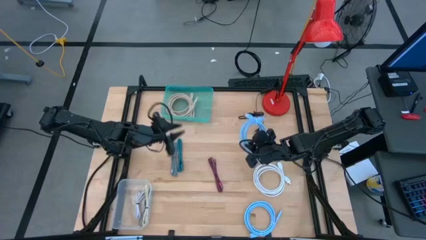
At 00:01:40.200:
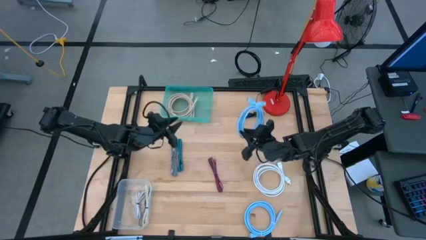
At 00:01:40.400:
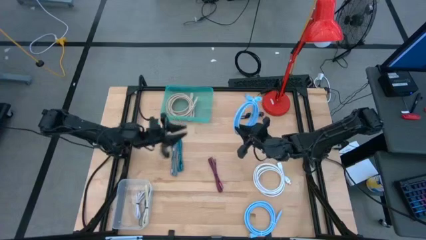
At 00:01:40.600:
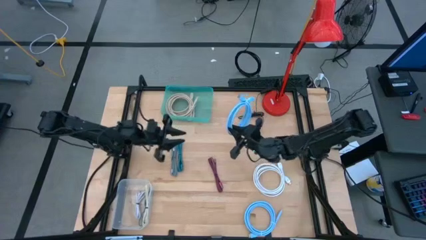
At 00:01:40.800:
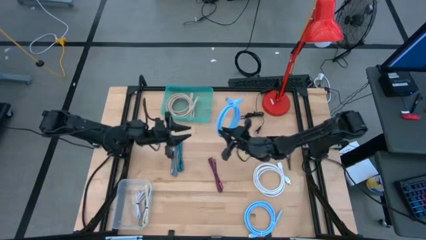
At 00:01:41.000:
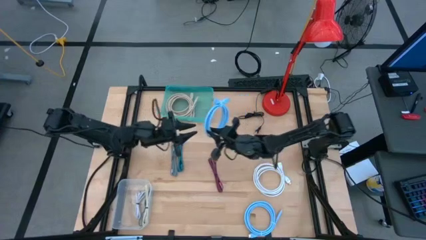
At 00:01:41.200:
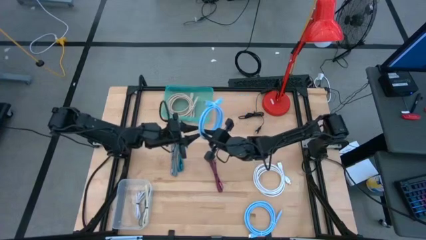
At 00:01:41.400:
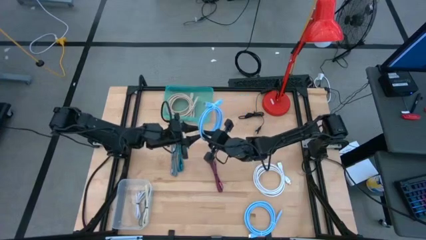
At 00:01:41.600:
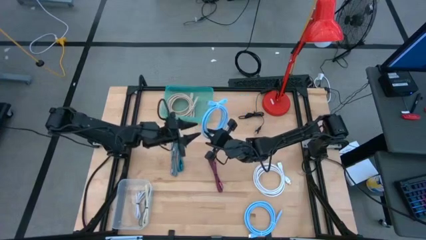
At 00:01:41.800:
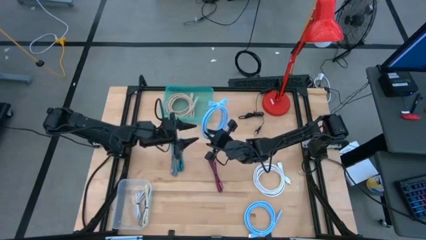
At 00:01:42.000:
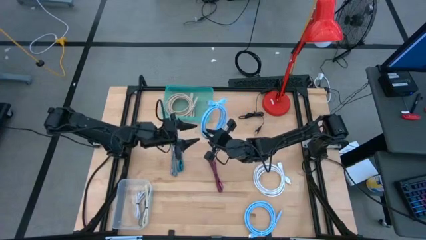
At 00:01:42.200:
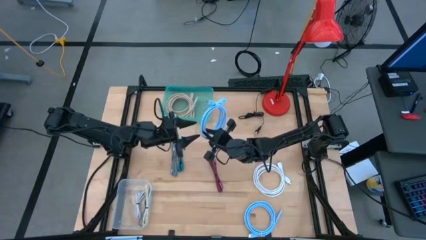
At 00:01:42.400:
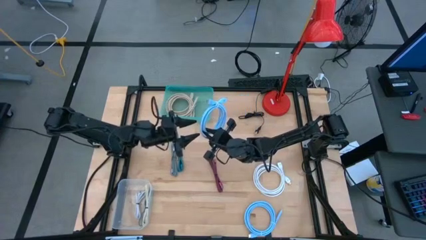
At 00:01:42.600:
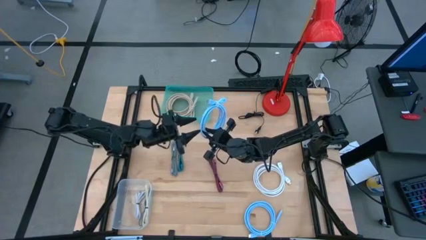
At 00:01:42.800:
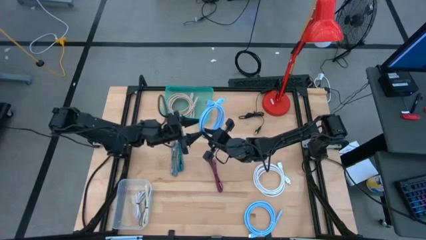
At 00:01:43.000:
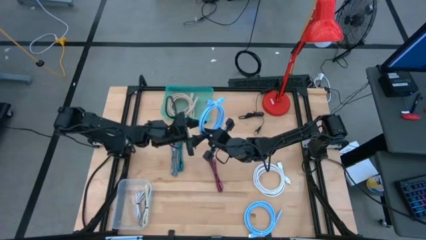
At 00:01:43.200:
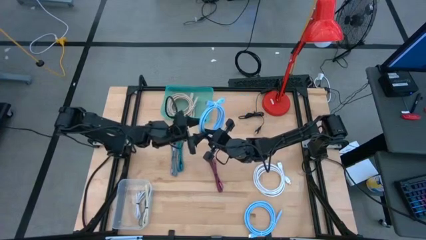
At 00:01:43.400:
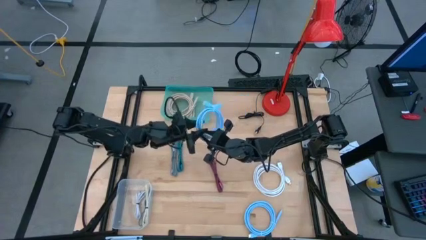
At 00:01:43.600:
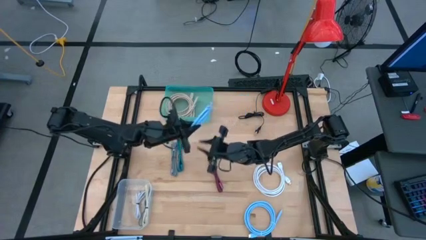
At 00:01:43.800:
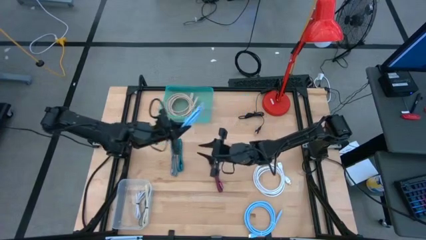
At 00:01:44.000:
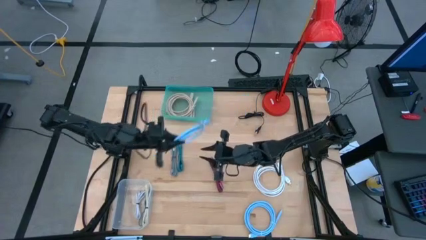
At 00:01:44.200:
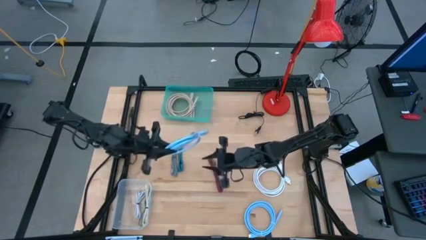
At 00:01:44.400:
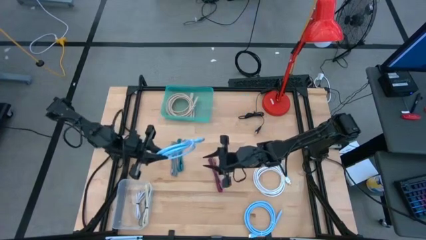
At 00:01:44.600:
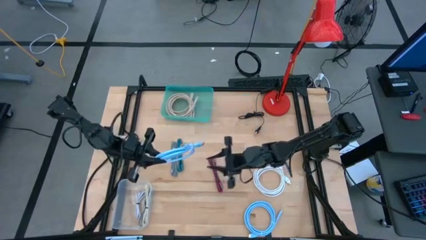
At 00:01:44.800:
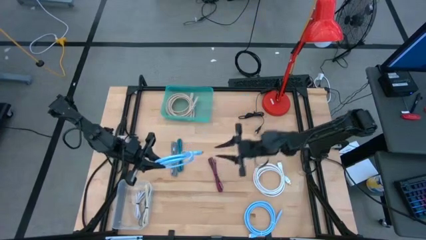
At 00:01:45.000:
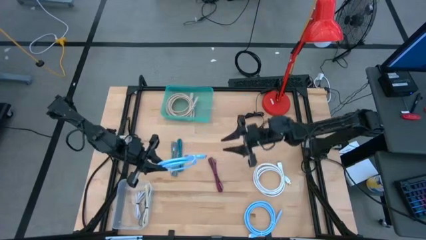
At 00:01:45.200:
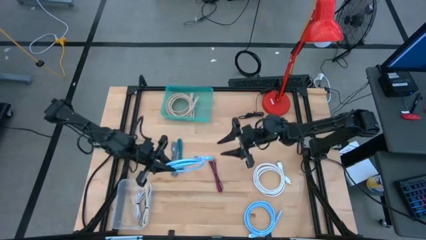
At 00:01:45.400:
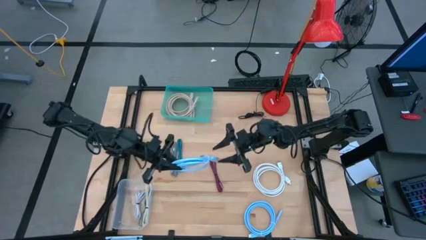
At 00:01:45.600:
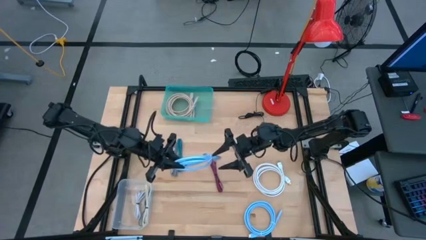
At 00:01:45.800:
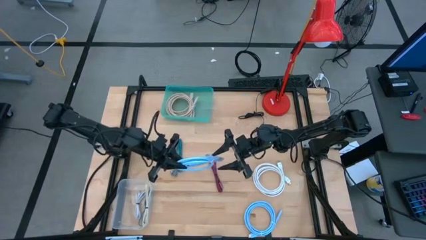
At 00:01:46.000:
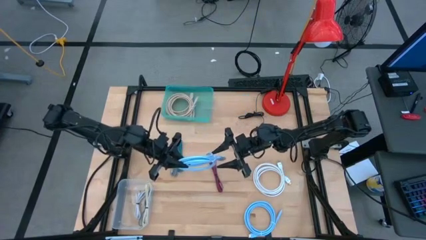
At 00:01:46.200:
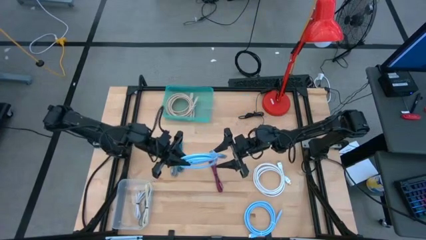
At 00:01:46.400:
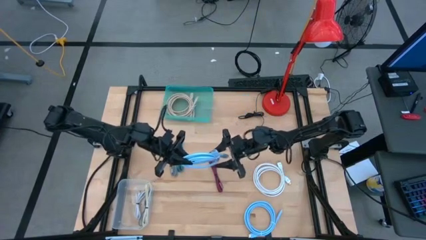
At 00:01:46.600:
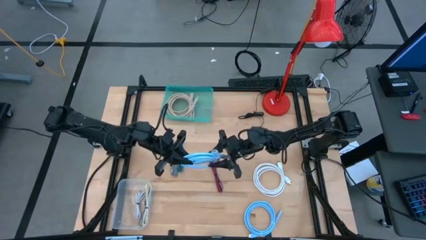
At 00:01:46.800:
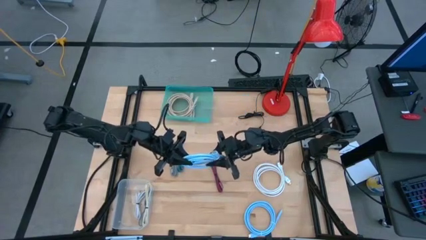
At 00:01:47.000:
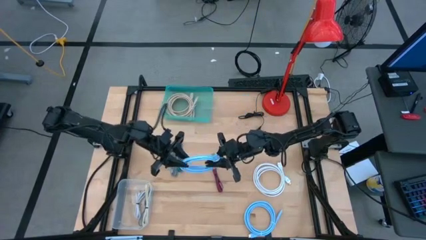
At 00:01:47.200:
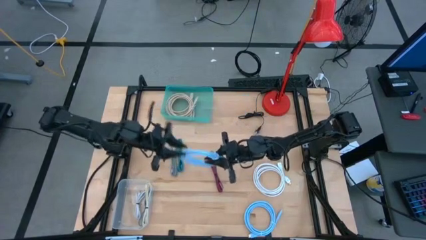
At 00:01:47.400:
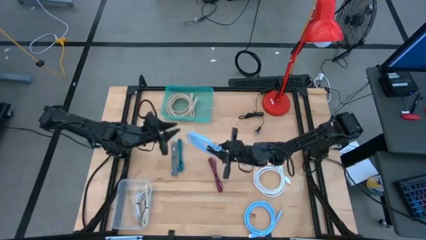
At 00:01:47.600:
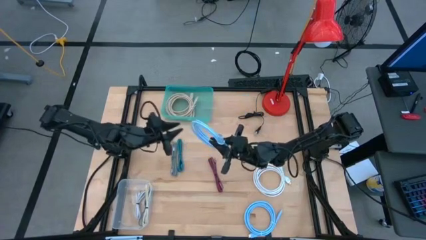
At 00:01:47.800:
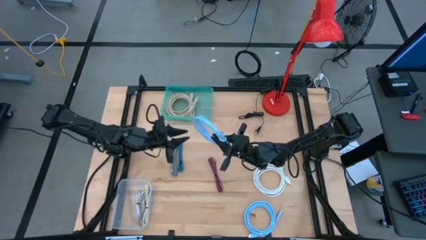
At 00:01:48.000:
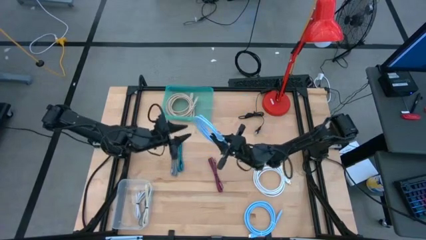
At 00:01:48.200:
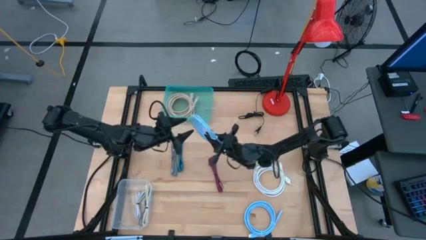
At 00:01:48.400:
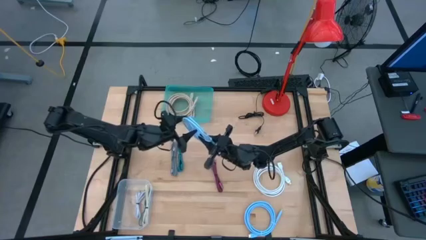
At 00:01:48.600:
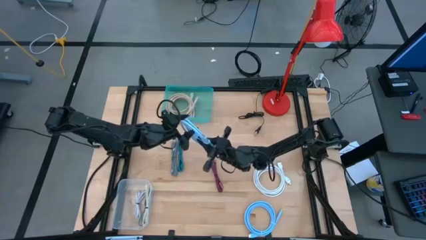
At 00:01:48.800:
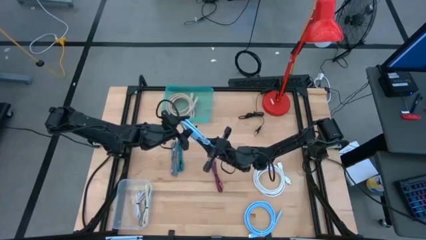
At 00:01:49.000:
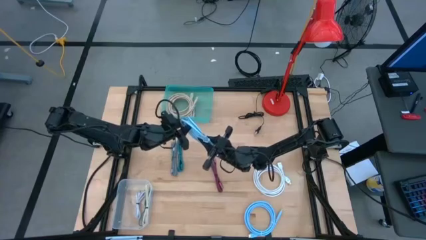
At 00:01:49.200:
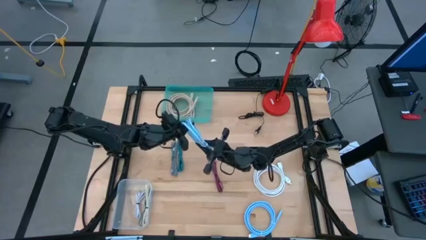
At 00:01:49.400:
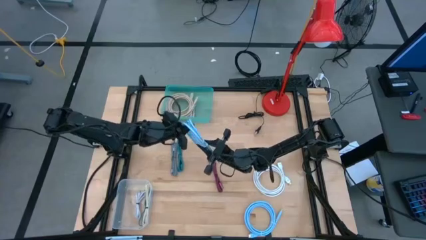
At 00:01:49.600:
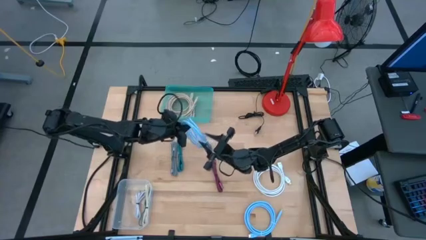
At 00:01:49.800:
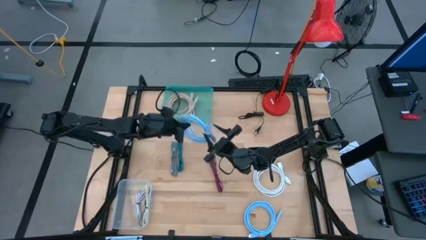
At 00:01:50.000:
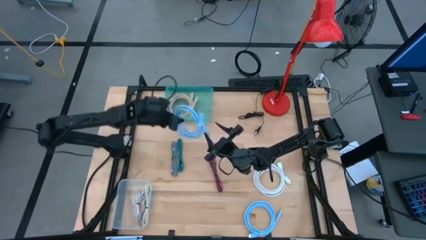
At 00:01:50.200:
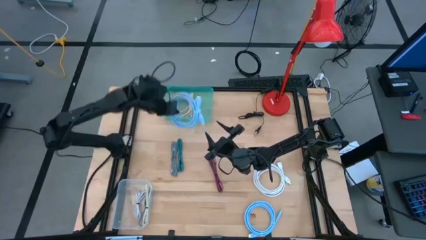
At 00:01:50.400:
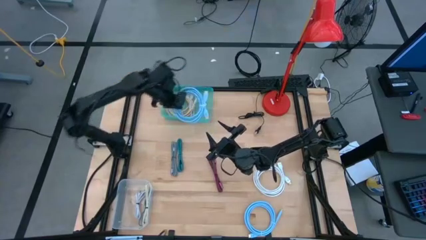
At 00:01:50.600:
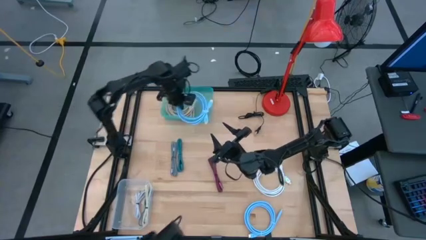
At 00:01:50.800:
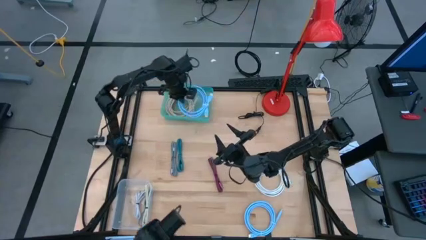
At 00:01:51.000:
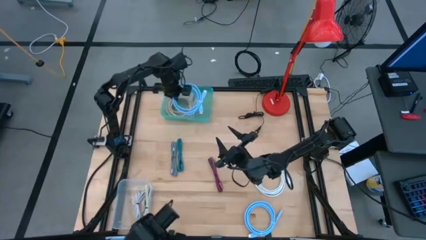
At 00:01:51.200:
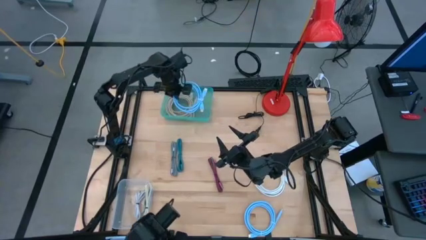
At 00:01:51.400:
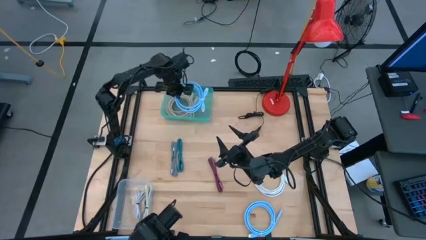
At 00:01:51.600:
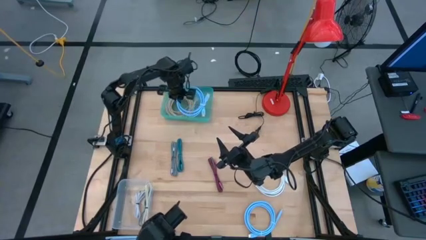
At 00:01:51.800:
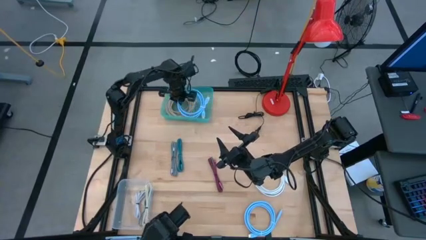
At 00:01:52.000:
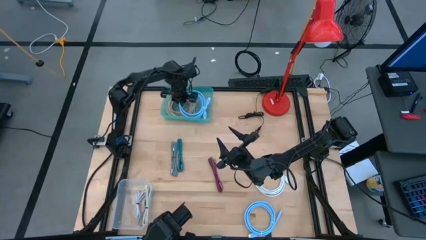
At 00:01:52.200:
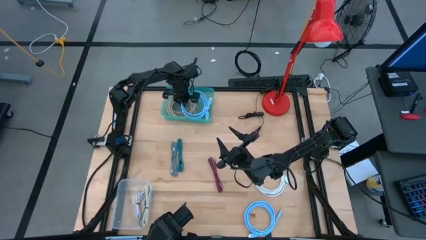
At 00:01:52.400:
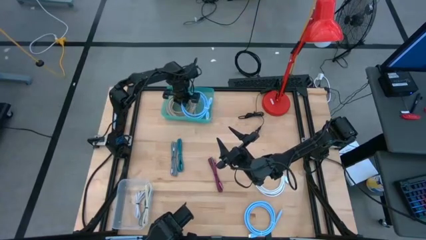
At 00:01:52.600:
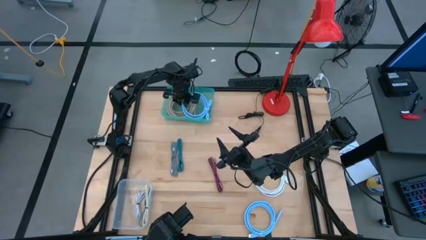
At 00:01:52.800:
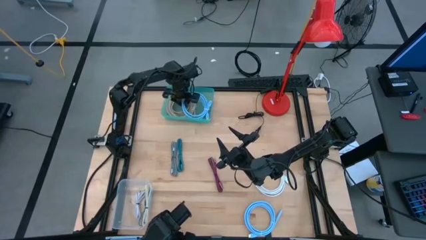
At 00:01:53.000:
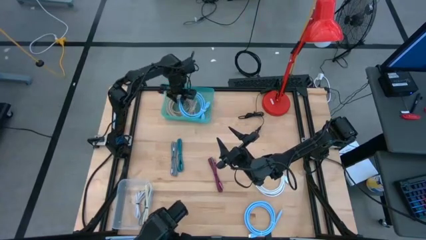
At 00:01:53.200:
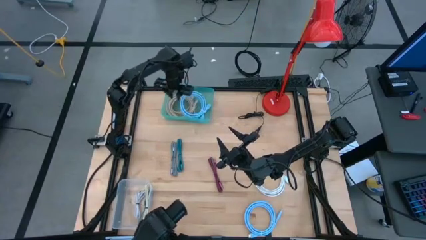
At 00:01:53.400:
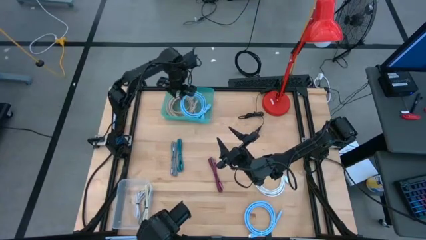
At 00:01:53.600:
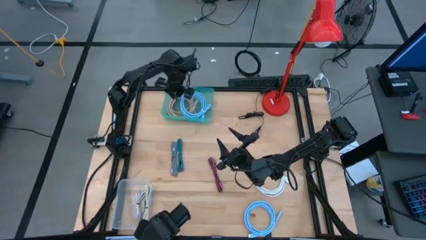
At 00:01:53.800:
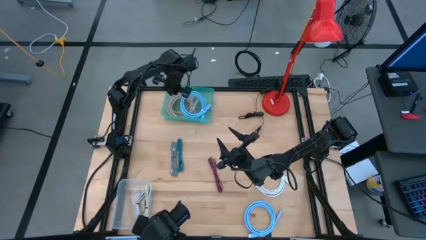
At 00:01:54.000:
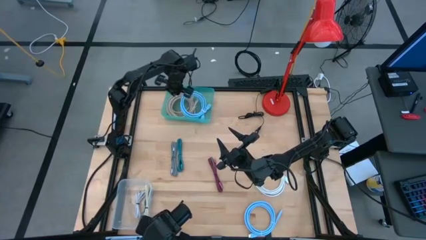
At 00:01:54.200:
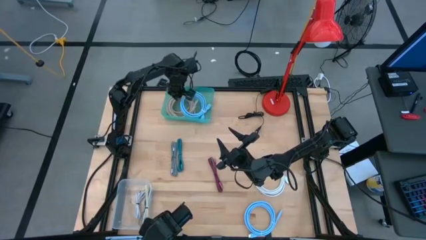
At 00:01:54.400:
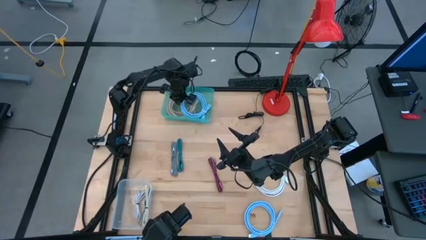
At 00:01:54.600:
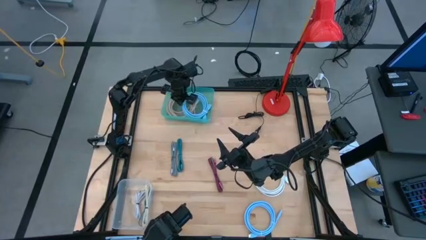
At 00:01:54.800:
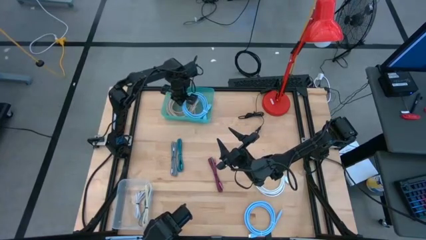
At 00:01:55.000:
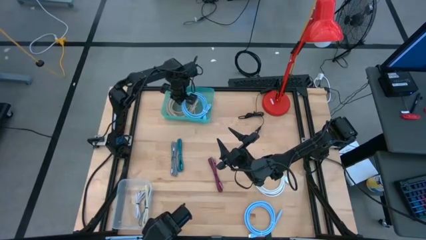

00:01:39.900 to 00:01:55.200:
Task: Pick & Place USB Port
Put the top blue HDMI cable into the green bin
